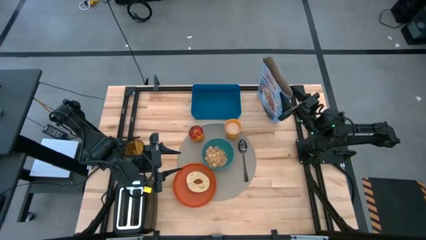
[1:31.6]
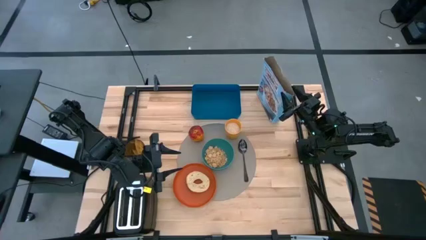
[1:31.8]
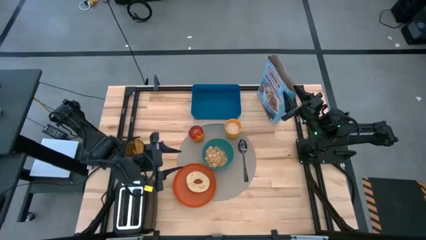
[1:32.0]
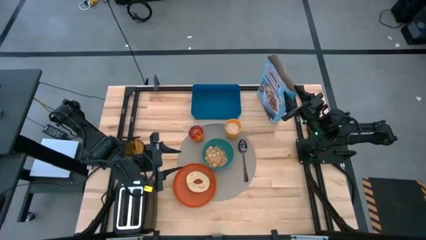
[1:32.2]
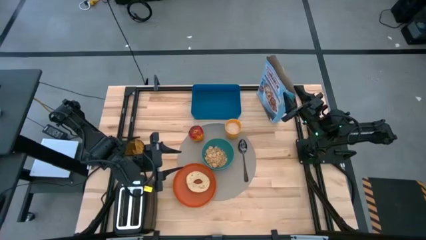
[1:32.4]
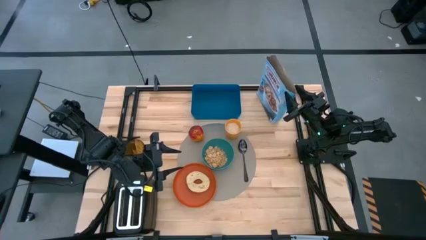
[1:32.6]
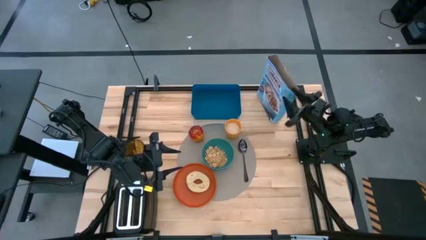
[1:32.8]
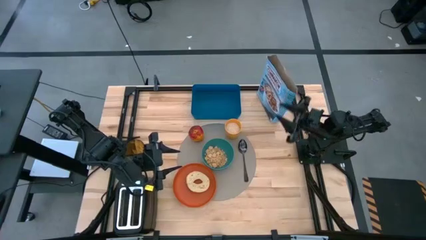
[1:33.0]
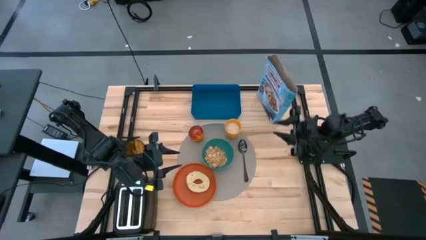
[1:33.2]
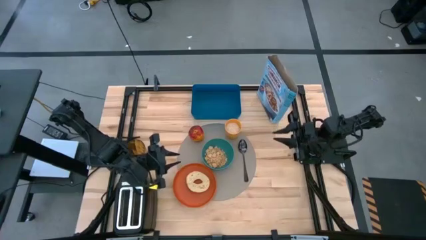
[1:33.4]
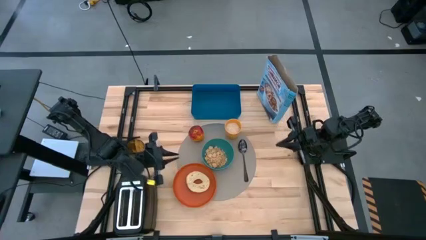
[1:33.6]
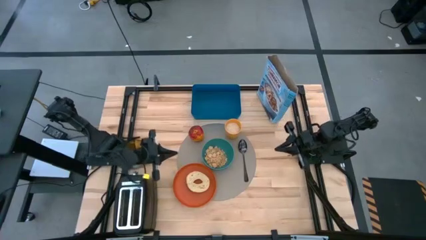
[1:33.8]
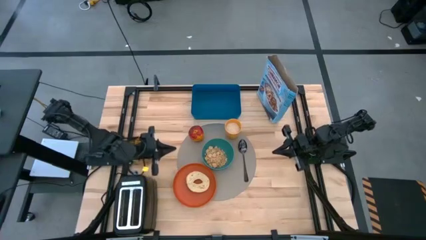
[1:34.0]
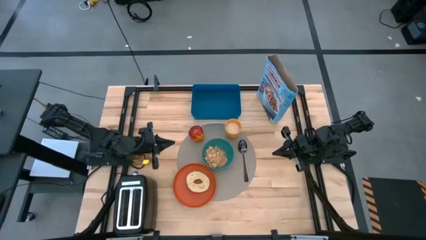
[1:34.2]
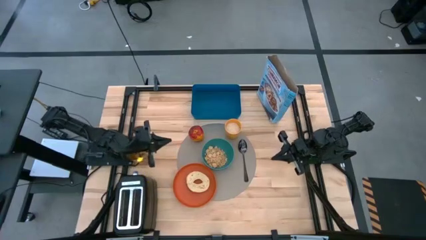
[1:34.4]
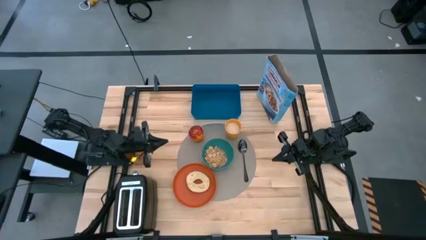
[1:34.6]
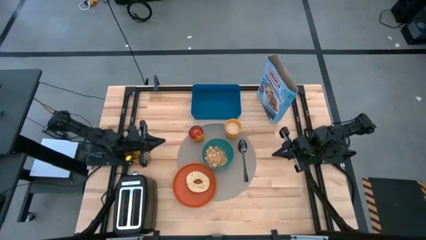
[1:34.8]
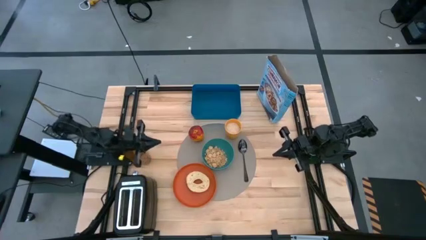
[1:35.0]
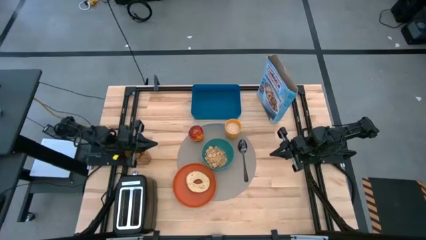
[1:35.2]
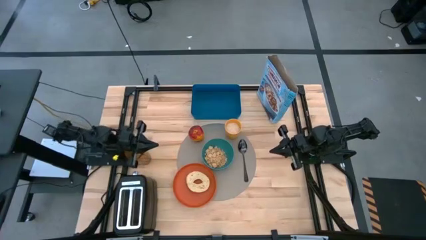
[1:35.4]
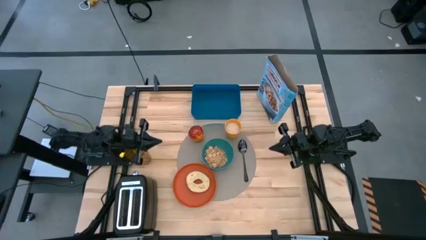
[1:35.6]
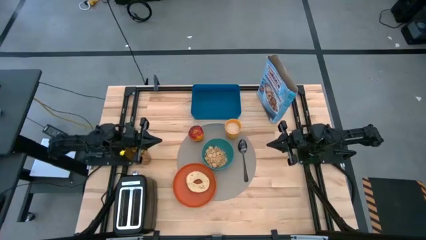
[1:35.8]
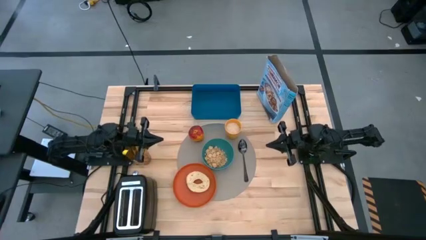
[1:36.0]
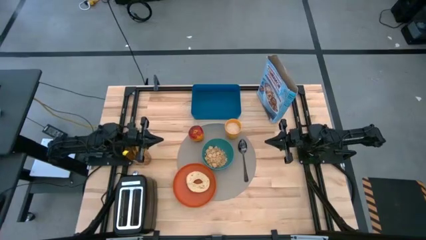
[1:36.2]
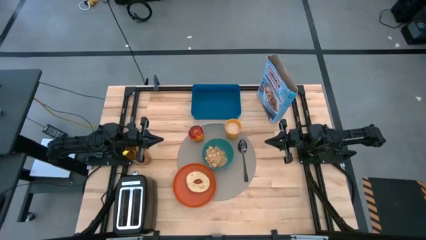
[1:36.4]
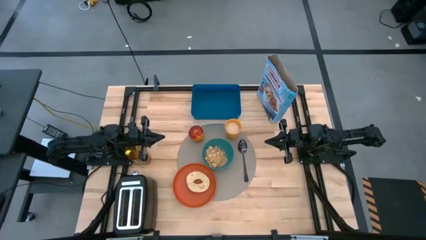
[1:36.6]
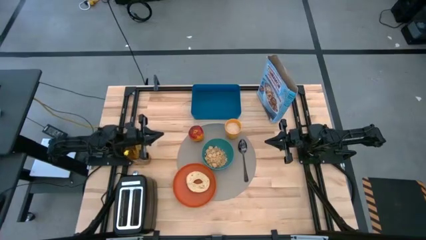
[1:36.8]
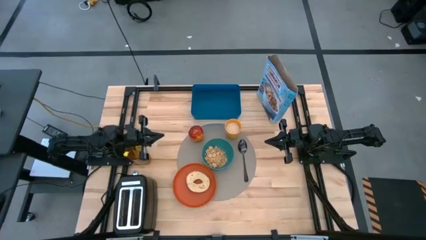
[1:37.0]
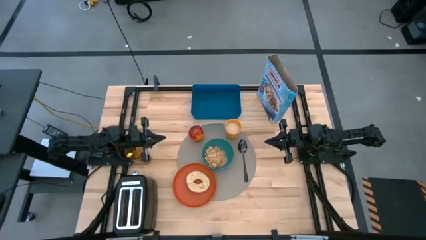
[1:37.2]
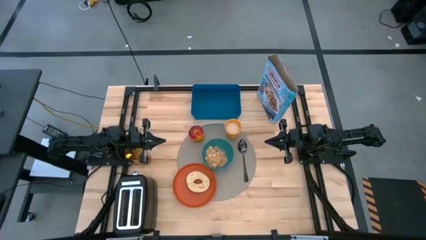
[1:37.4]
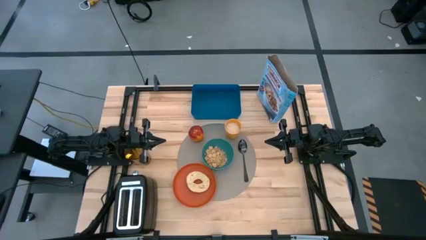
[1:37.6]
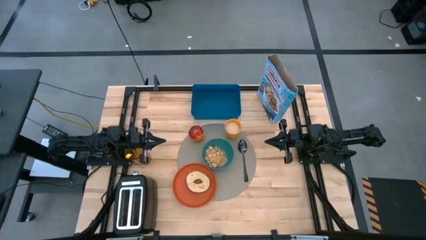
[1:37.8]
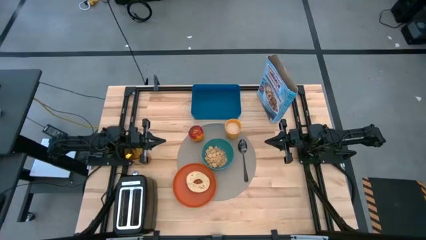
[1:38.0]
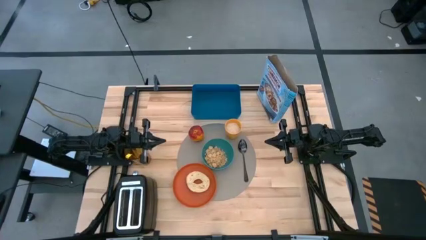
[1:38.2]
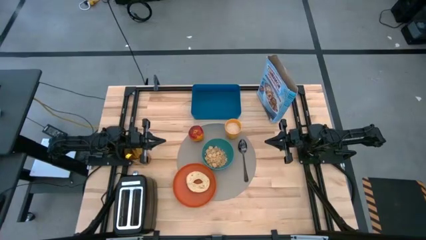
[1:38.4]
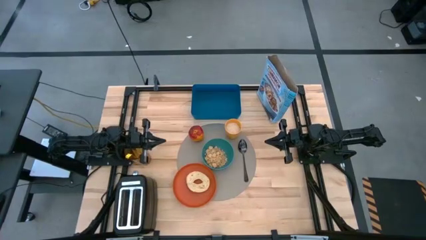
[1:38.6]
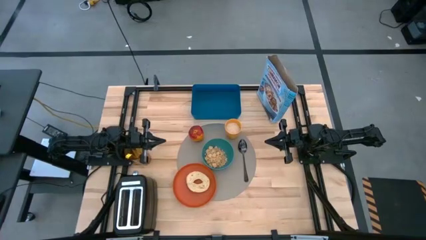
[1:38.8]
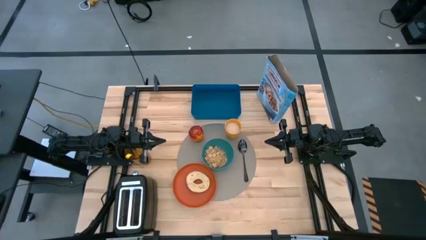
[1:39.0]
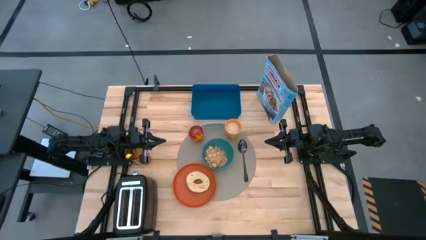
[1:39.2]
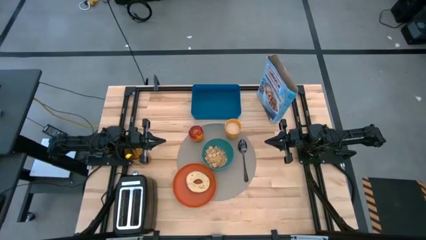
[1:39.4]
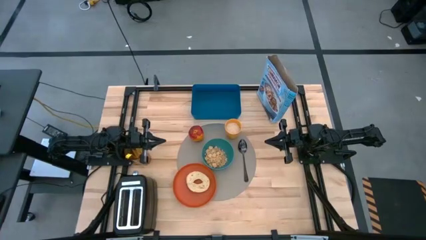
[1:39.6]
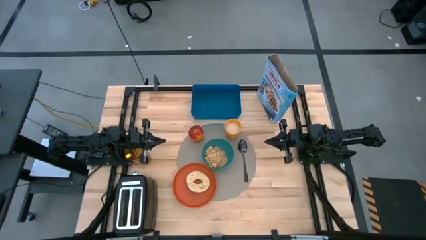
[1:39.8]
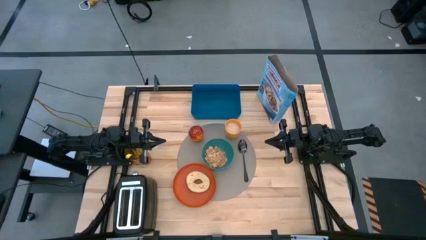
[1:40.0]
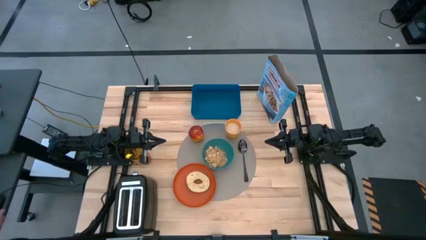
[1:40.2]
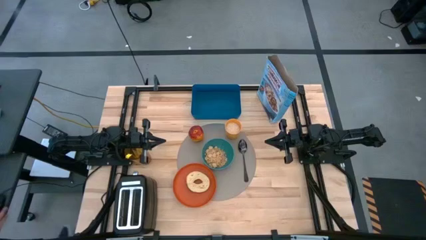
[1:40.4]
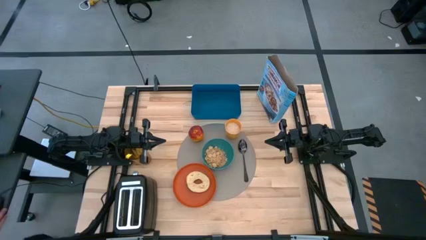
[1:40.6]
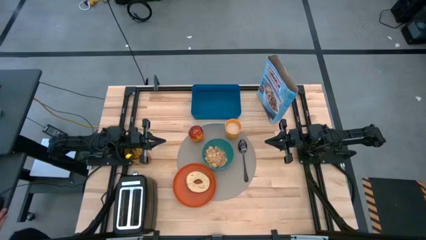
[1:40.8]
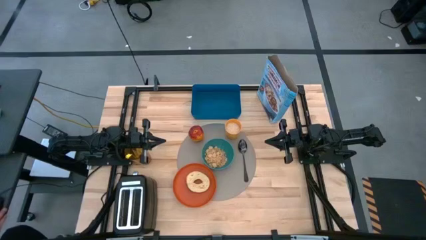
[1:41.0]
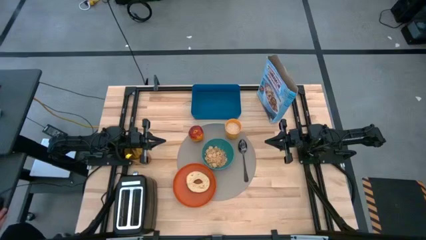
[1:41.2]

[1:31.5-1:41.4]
Task: Arrange a breakfast setting
Return to Home Position

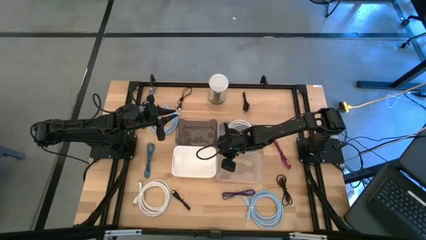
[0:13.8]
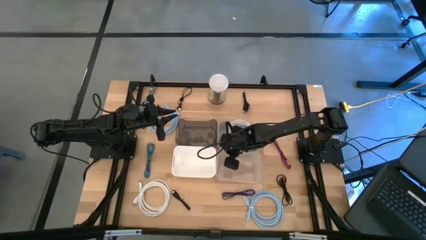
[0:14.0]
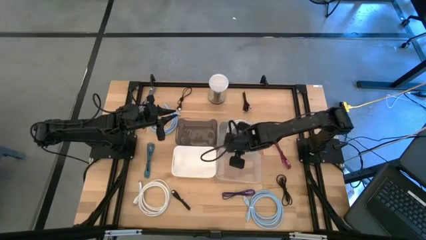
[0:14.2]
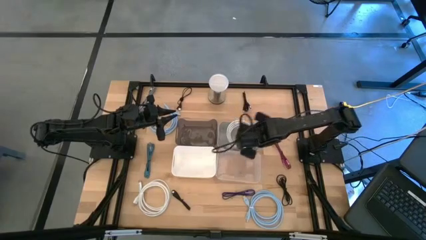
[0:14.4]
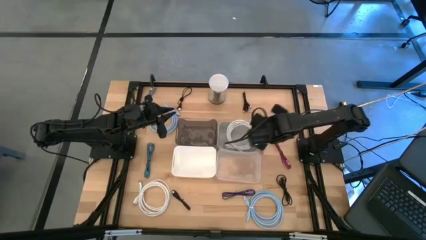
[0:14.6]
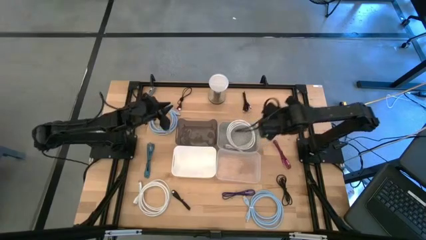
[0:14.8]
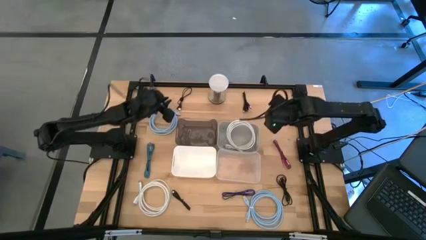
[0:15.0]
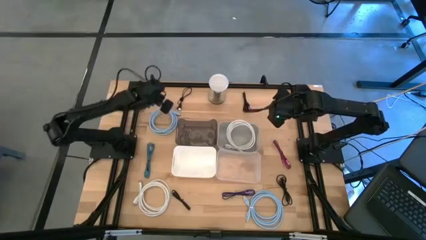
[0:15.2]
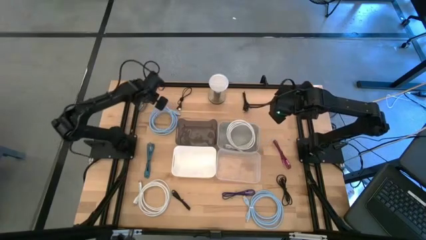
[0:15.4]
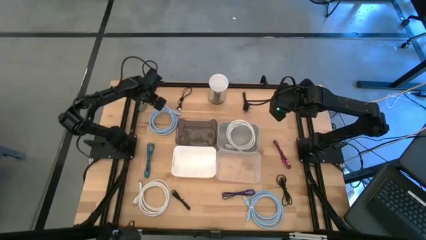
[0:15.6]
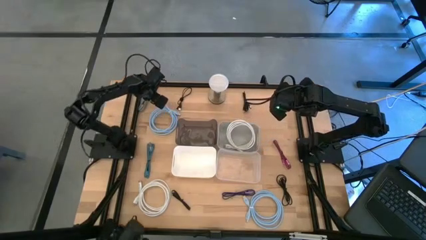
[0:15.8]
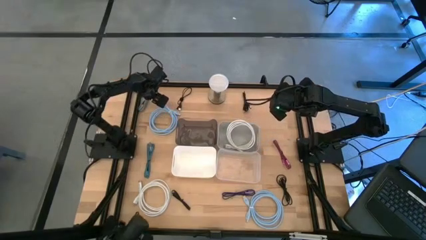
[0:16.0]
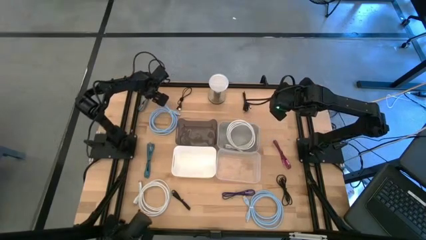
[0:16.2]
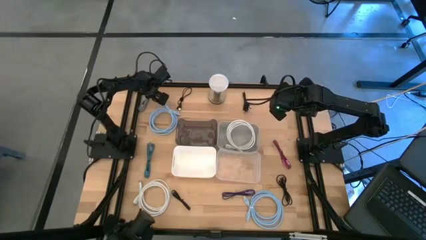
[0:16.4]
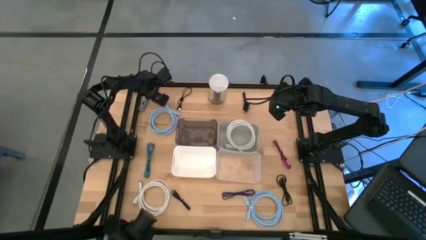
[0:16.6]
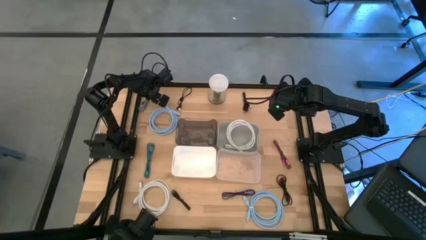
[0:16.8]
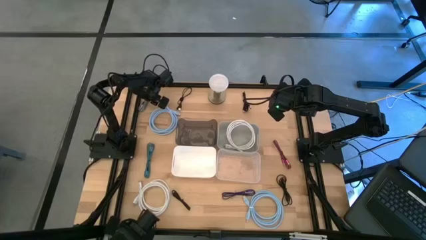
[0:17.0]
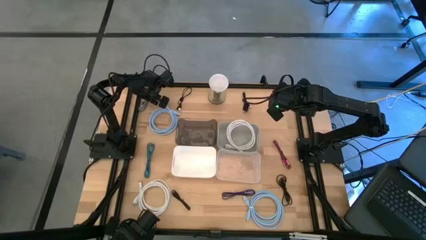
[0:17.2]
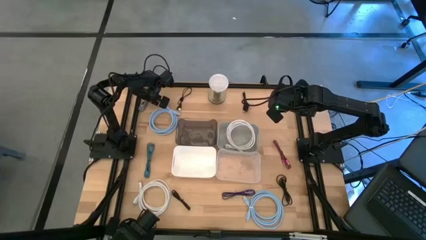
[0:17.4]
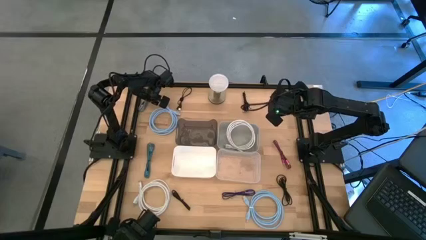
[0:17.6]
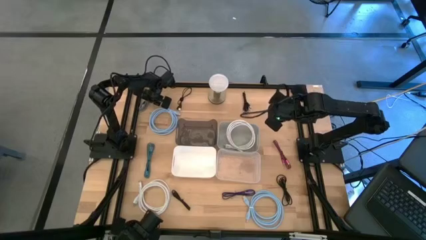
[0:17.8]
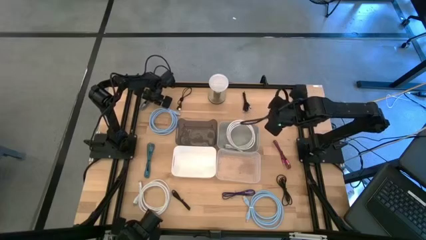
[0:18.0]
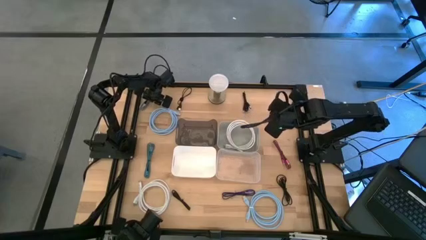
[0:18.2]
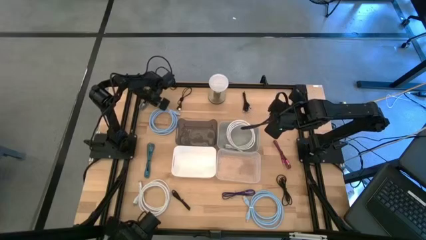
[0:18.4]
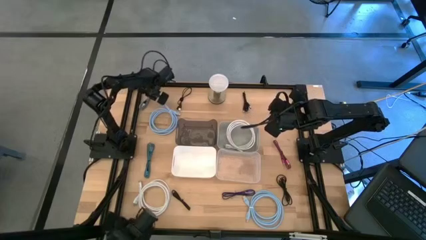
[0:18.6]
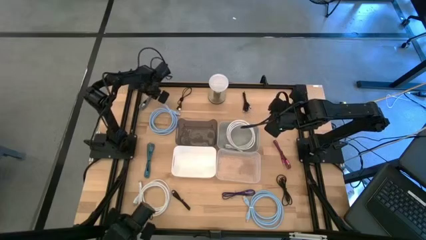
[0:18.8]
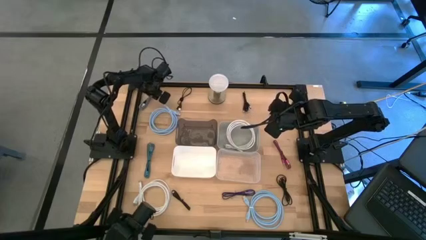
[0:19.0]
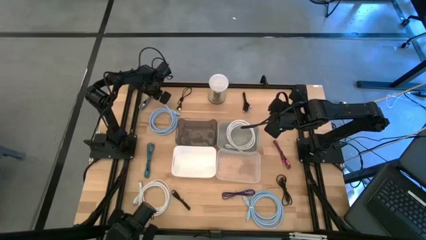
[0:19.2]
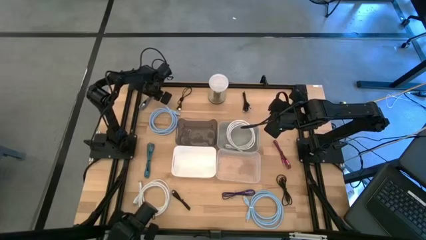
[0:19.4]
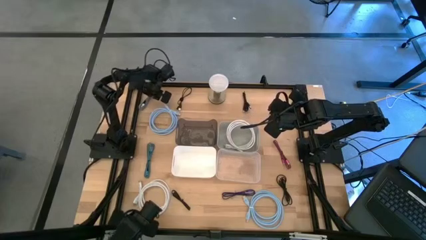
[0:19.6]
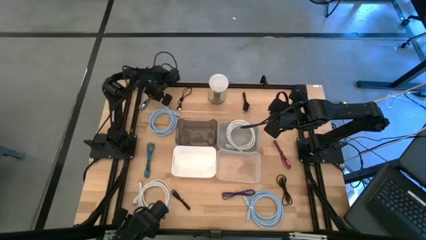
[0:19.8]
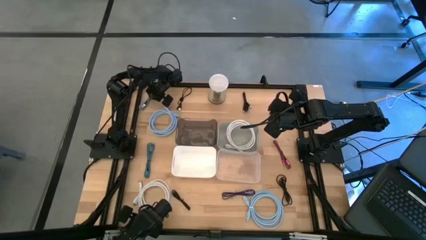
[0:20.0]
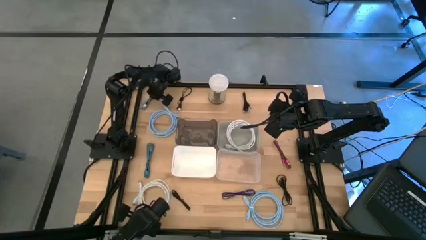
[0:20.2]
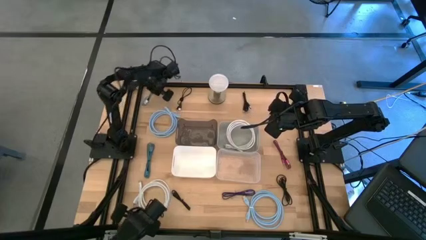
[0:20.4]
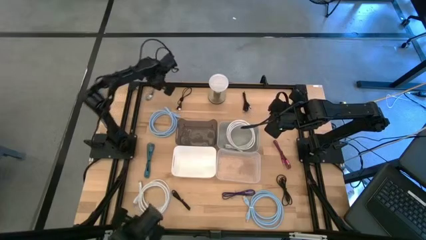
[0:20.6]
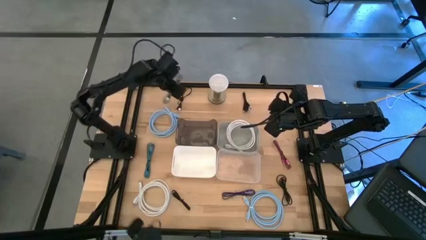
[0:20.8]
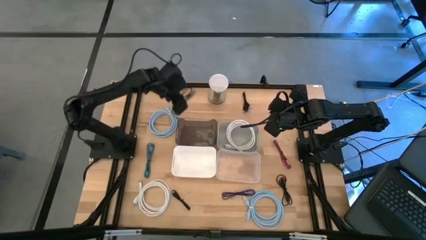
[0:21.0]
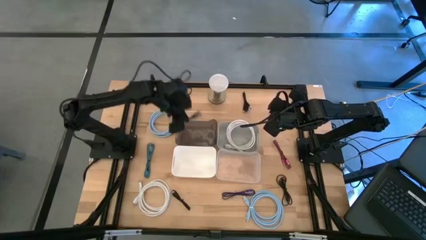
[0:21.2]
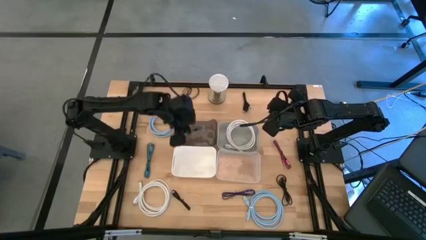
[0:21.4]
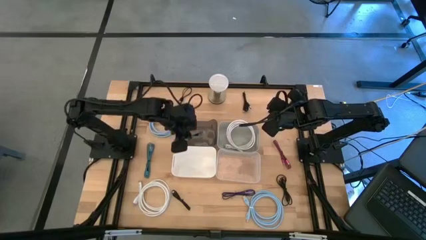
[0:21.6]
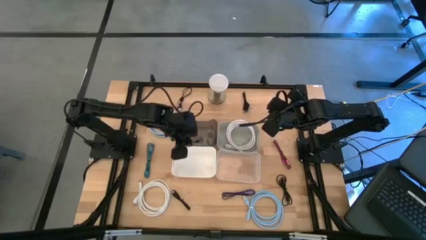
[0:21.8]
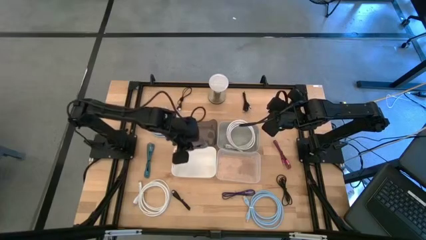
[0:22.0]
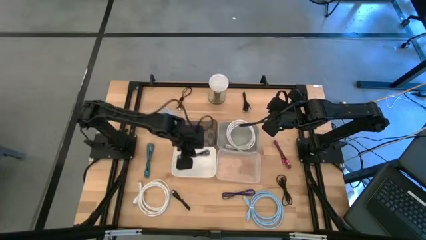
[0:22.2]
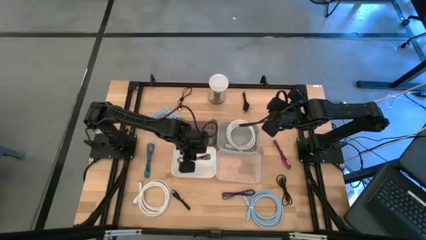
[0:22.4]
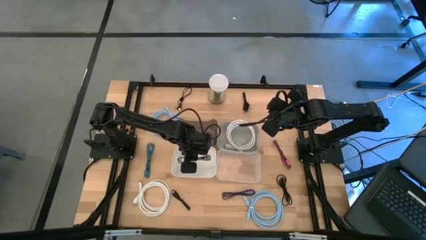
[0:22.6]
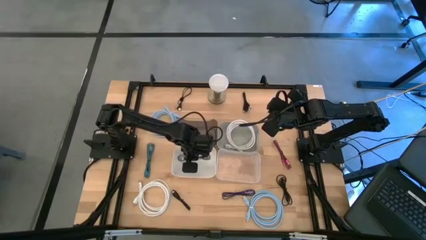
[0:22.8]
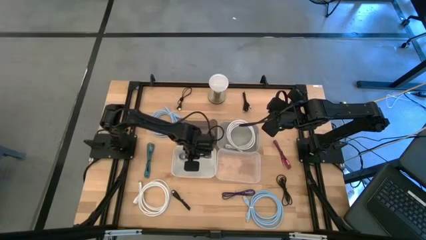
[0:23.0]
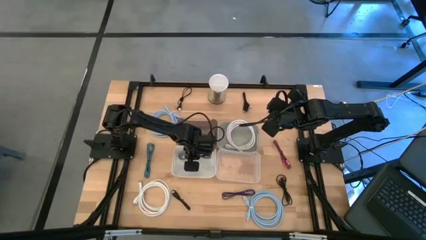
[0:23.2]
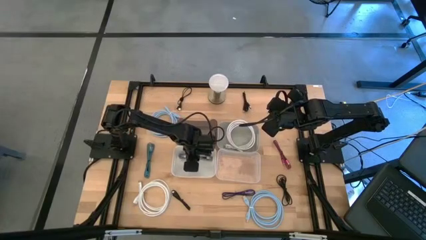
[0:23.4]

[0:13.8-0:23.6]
Task: Pick & Place USB Port
Put the white patterned charger cable into the white bin
